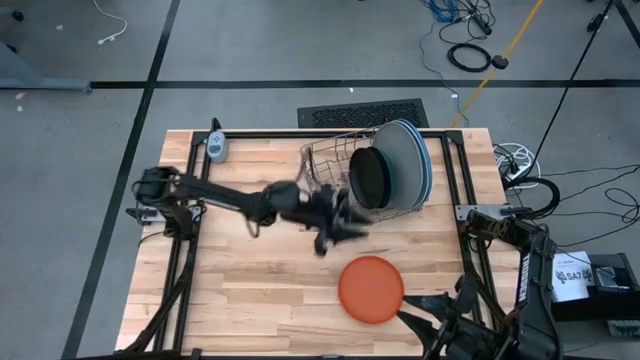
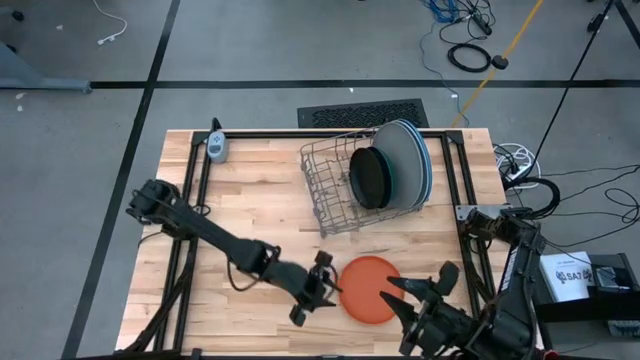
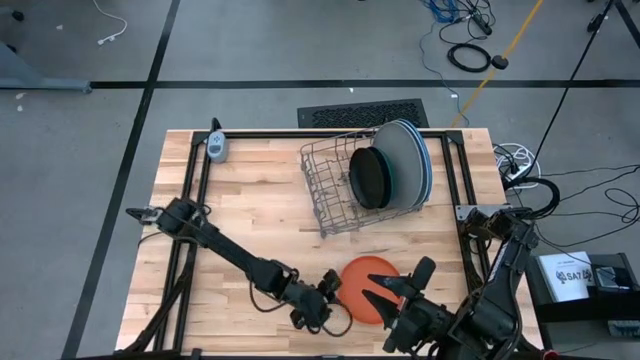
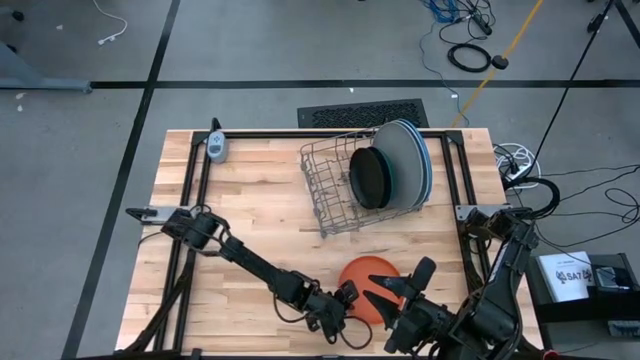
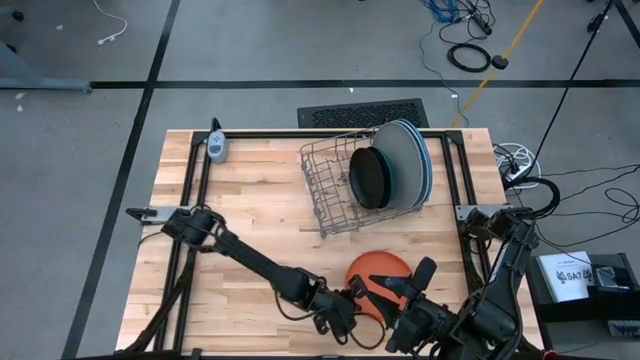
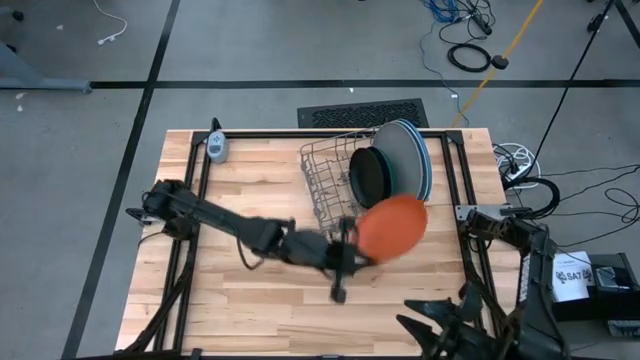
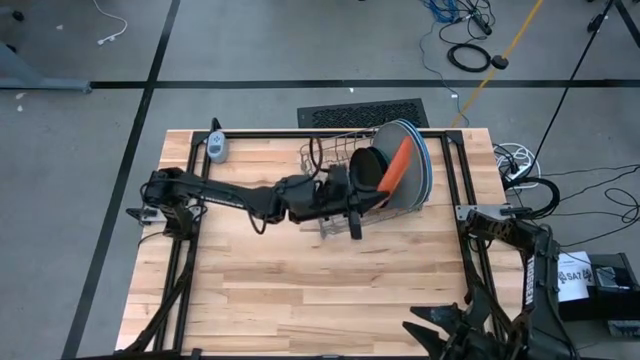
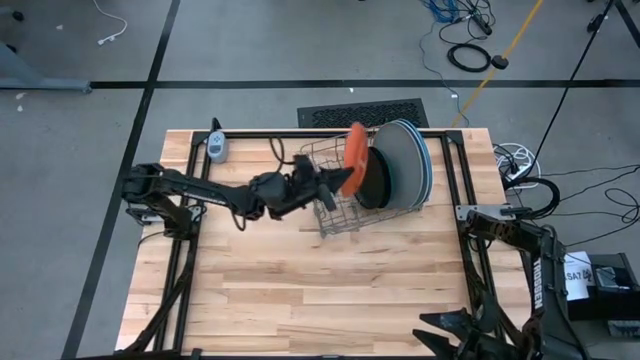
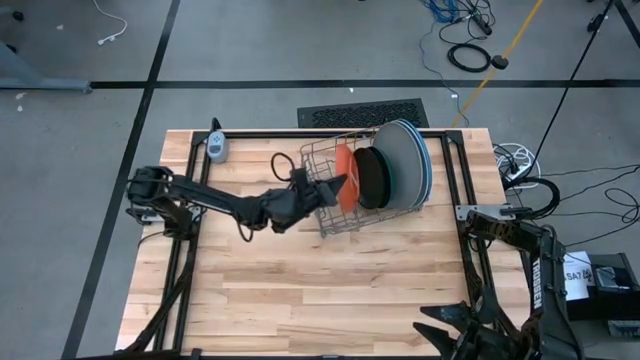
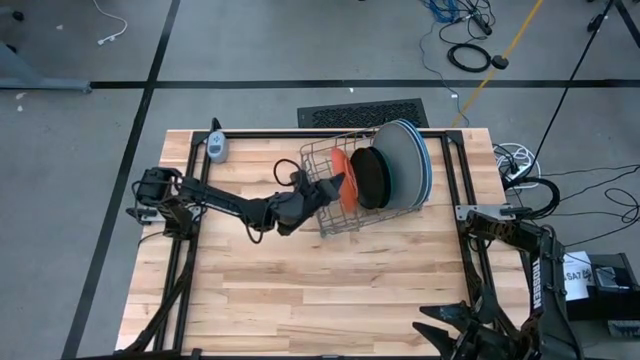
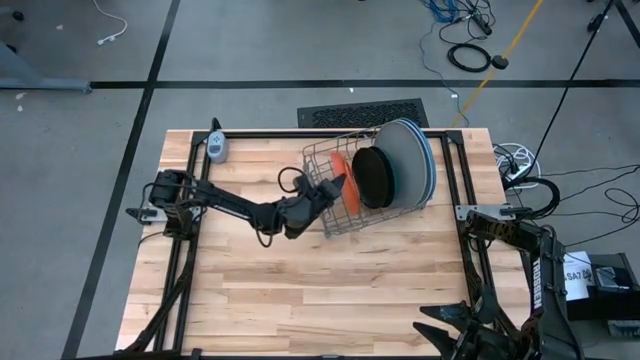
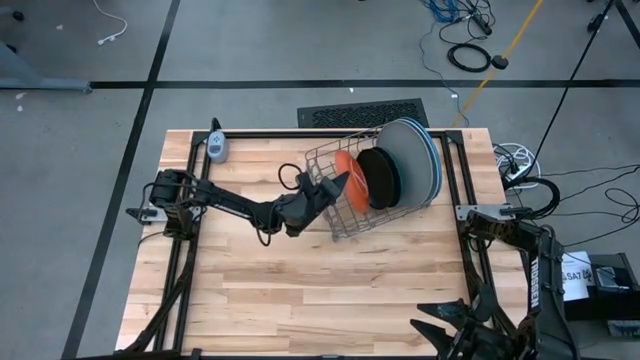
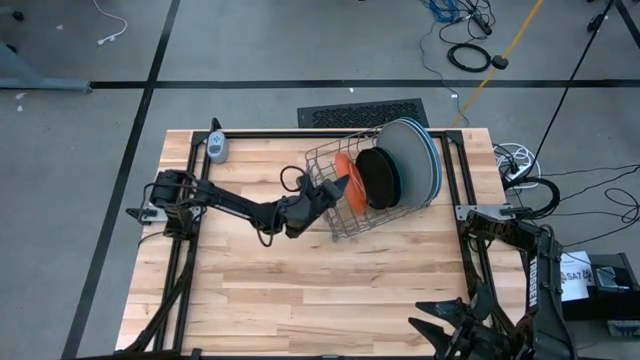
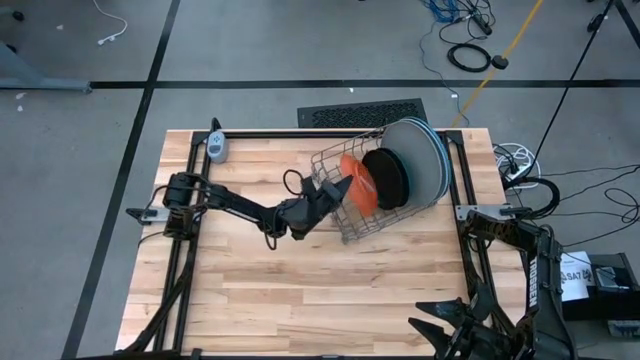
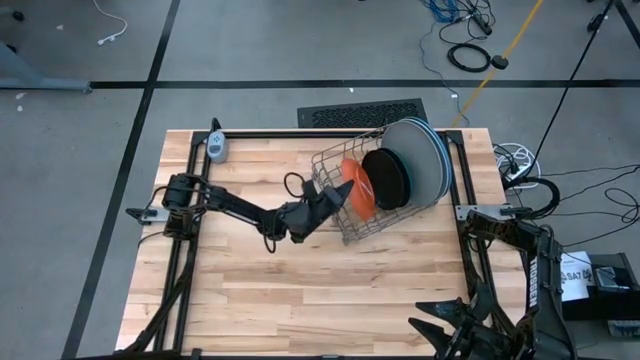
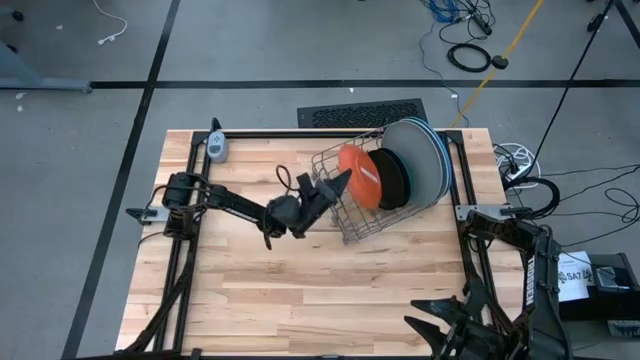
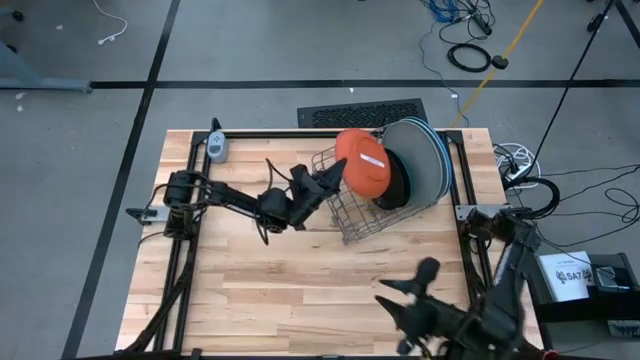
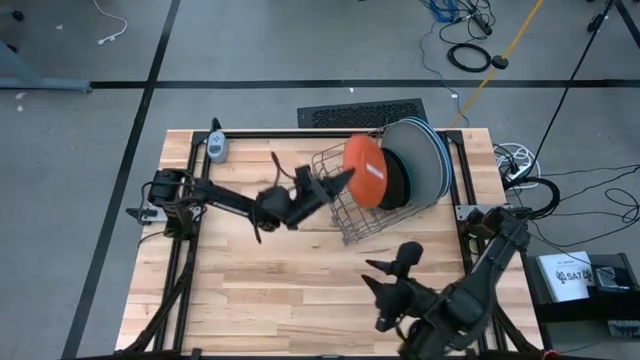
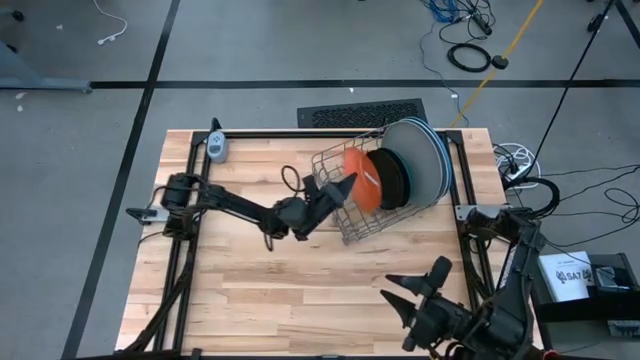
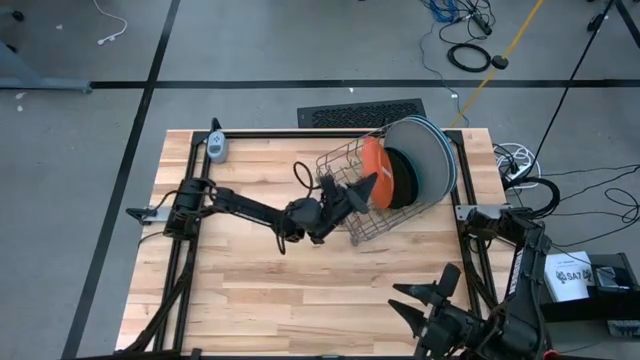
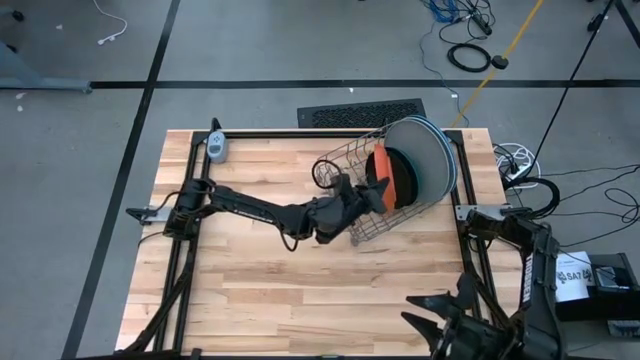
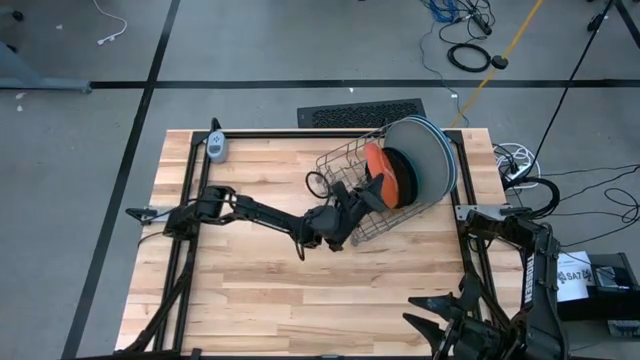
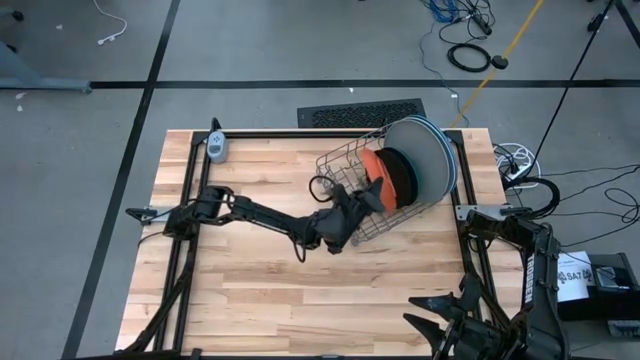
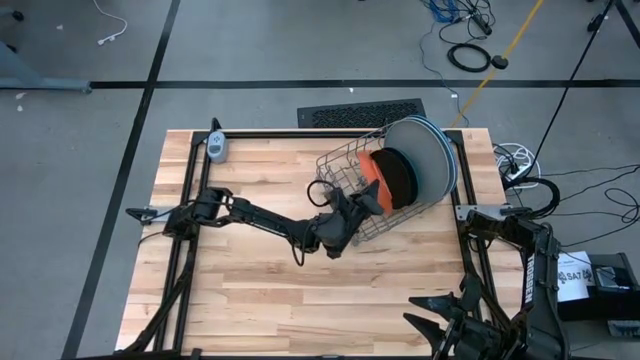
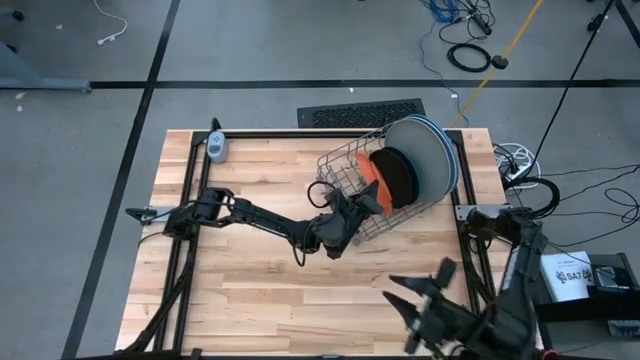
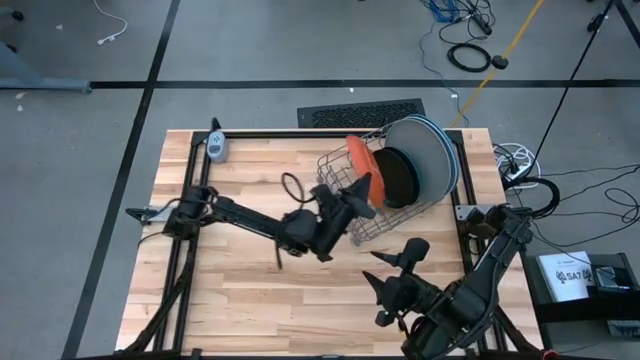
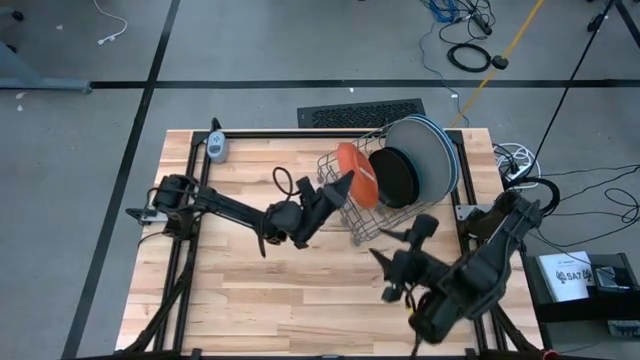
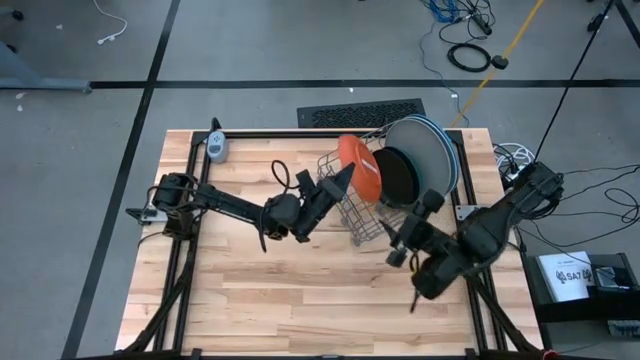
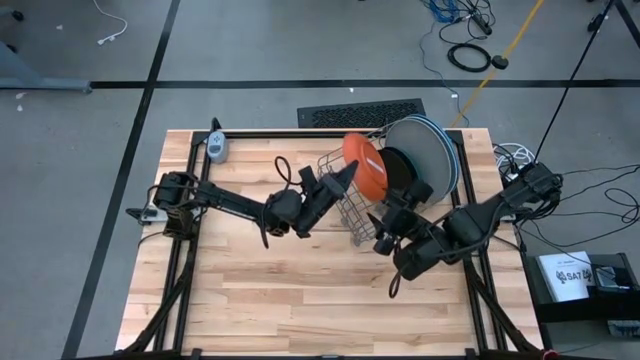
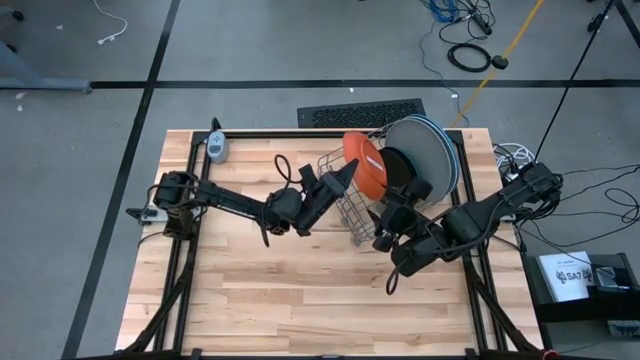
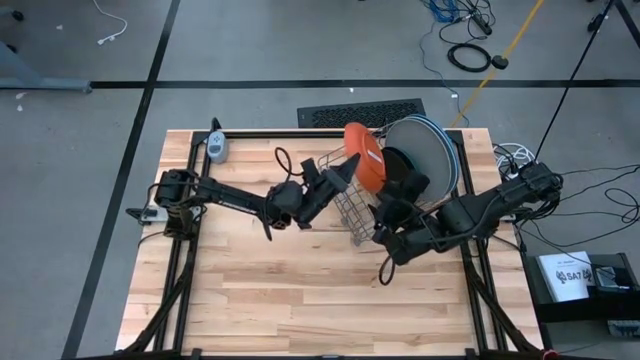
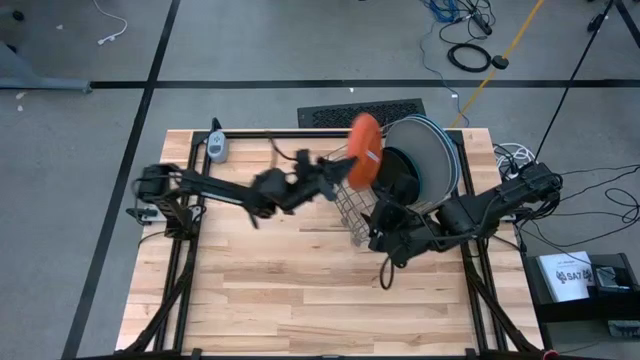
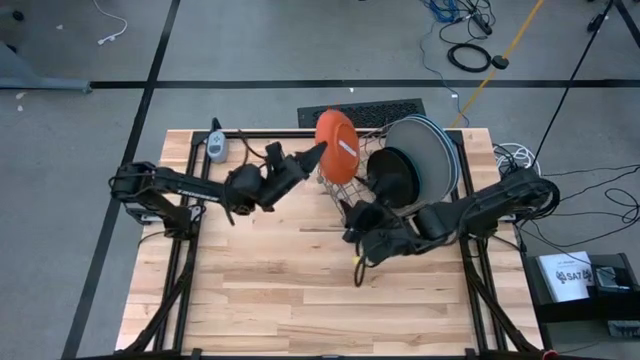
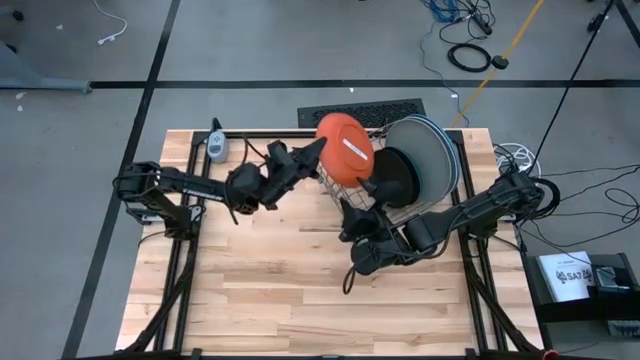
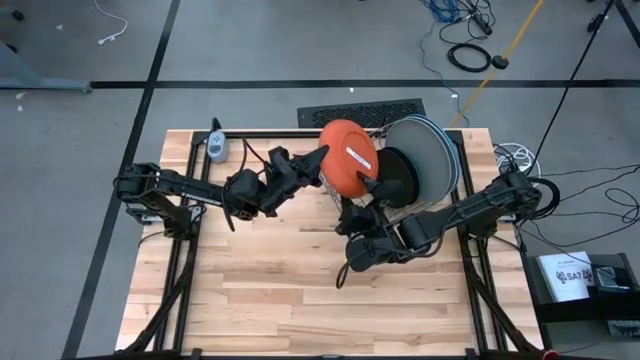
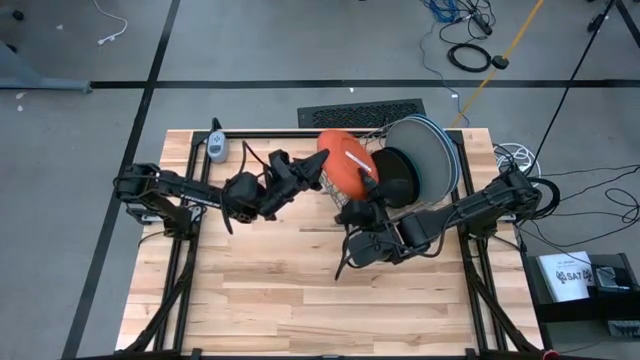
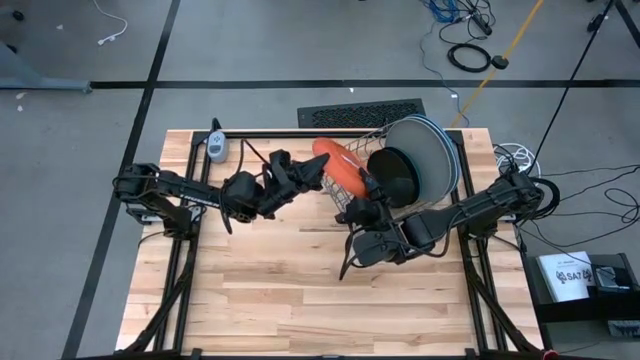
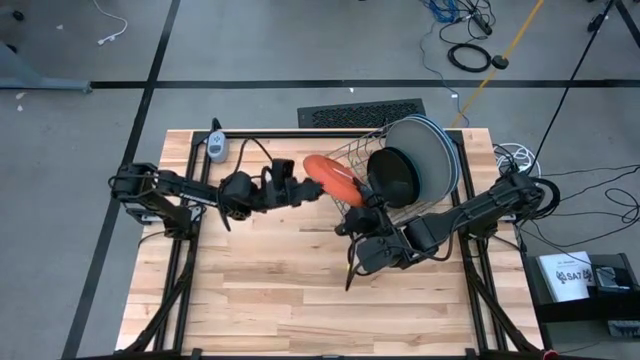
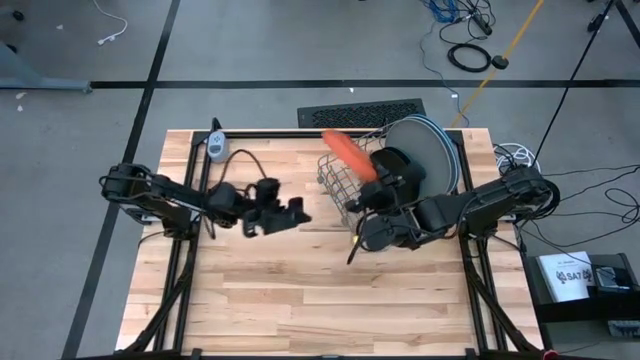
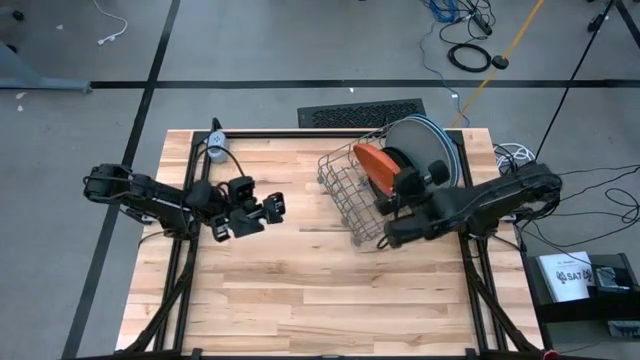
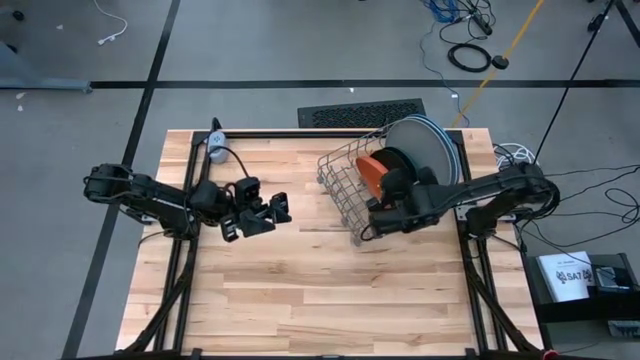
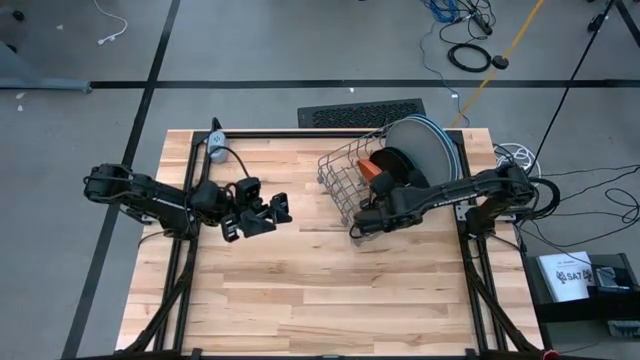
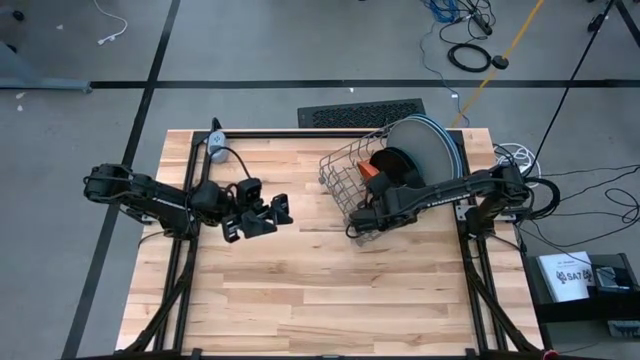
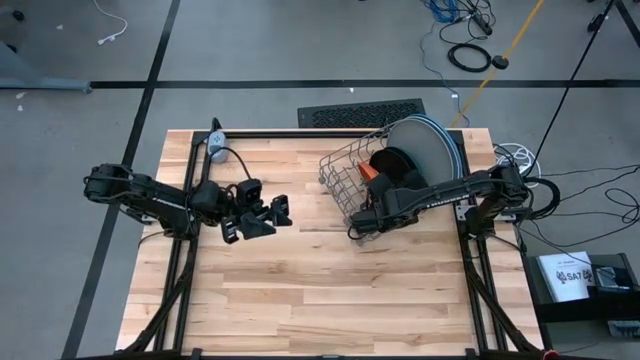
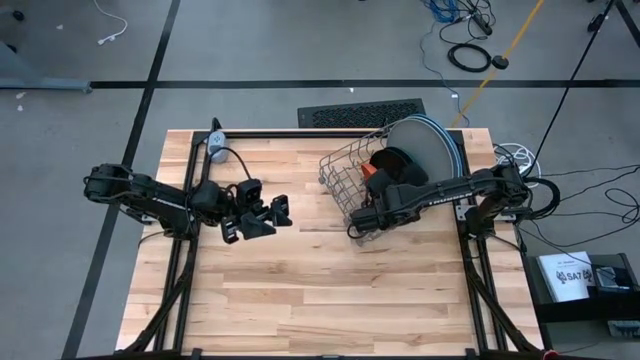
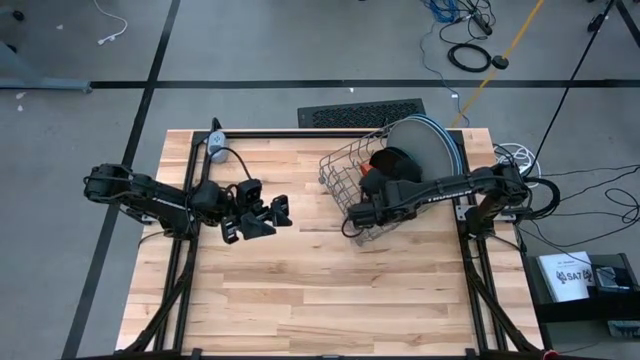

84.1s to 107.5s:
Task: Sort dishes
Put the orange plate in the dish rack
